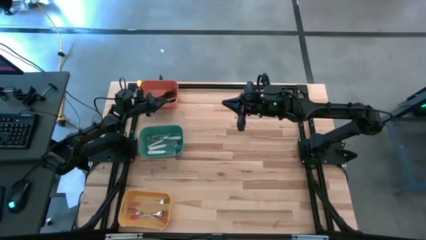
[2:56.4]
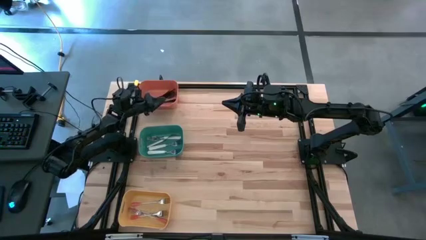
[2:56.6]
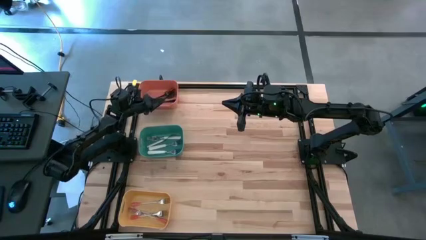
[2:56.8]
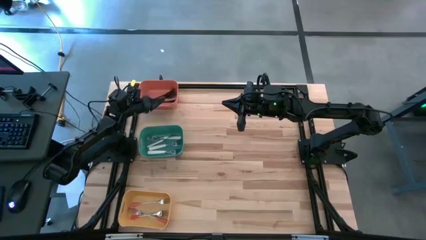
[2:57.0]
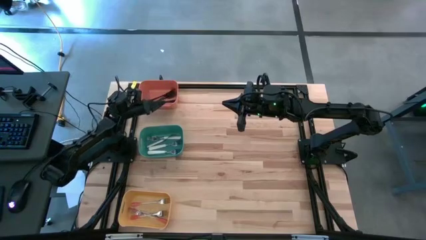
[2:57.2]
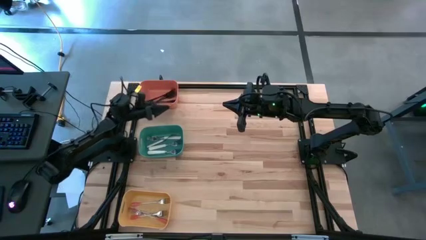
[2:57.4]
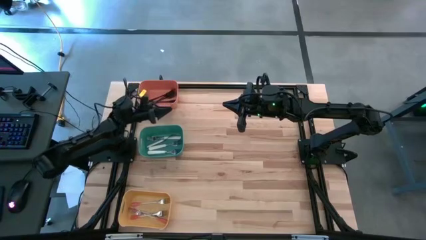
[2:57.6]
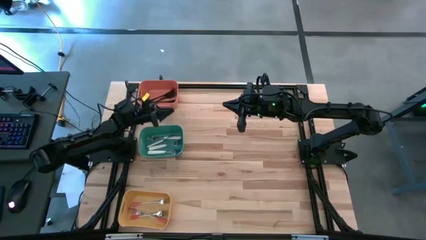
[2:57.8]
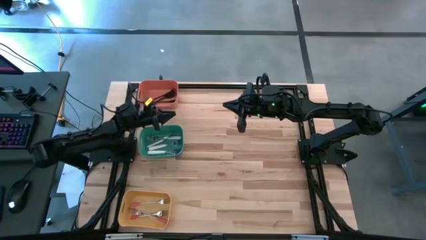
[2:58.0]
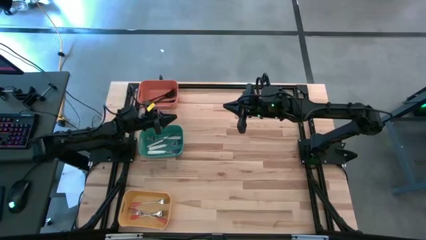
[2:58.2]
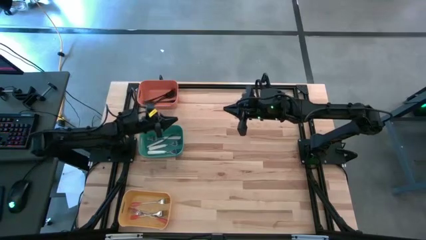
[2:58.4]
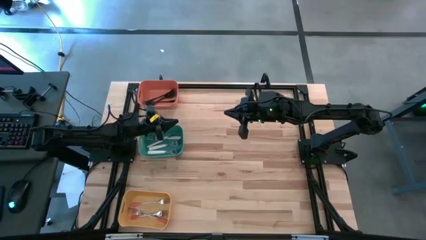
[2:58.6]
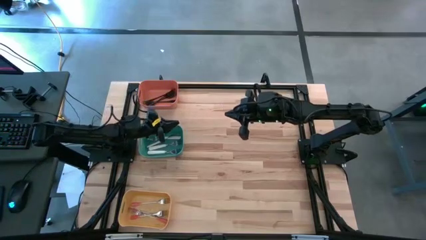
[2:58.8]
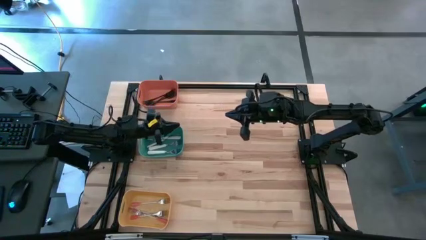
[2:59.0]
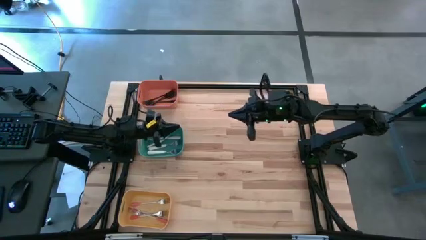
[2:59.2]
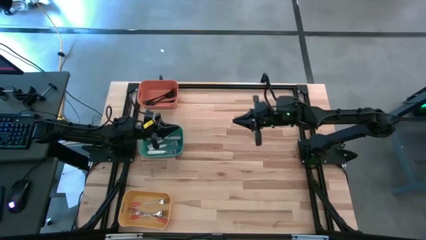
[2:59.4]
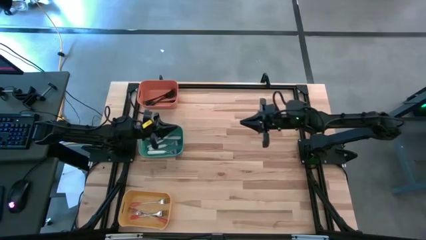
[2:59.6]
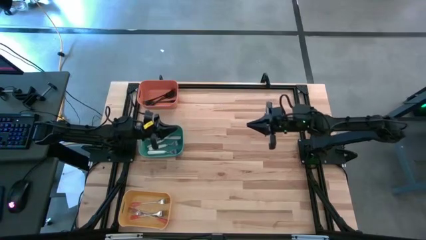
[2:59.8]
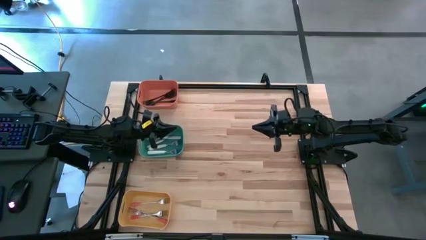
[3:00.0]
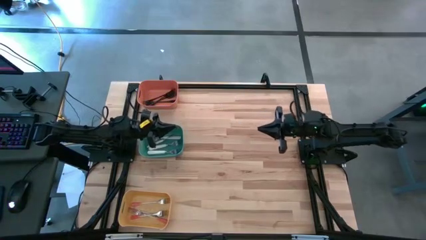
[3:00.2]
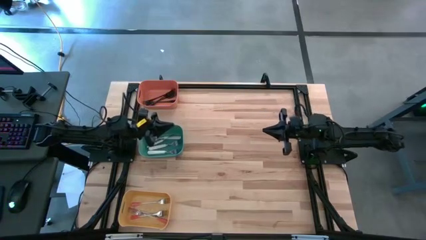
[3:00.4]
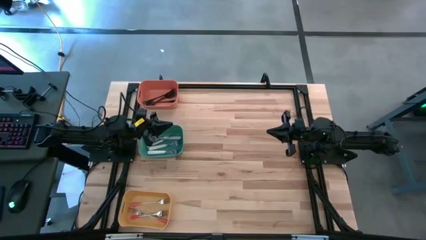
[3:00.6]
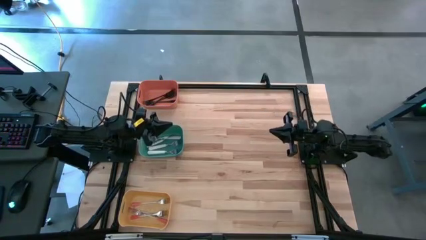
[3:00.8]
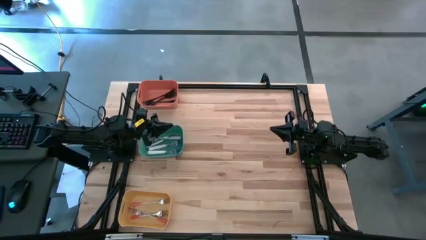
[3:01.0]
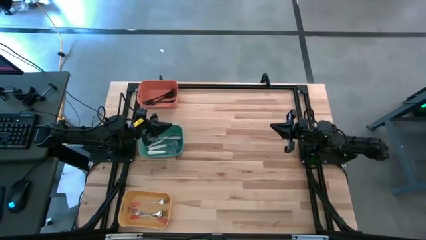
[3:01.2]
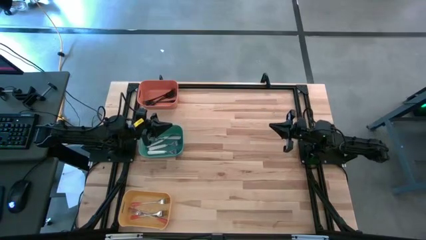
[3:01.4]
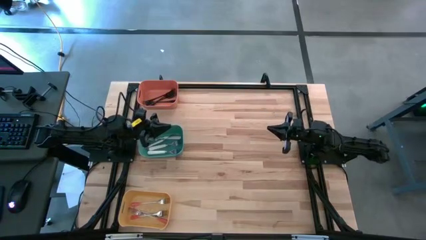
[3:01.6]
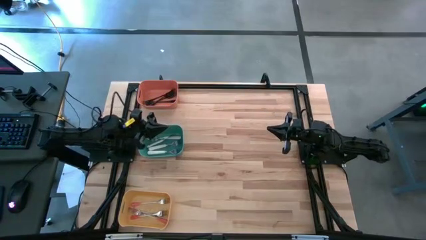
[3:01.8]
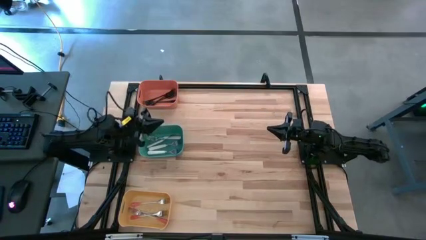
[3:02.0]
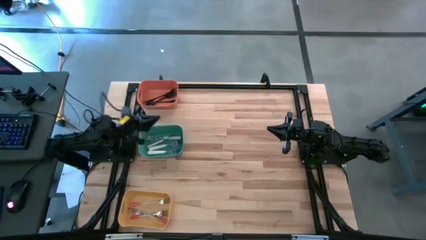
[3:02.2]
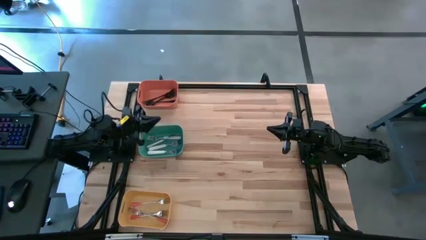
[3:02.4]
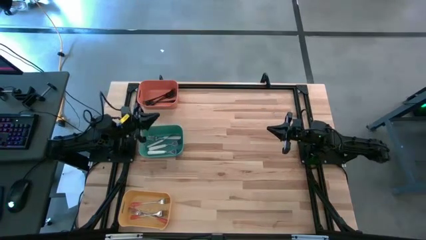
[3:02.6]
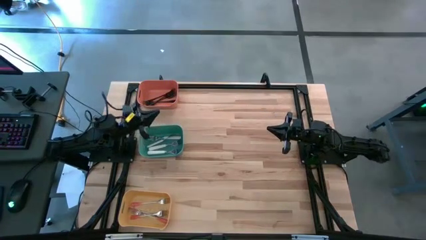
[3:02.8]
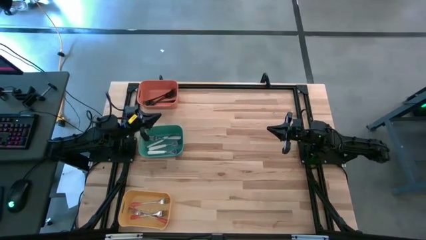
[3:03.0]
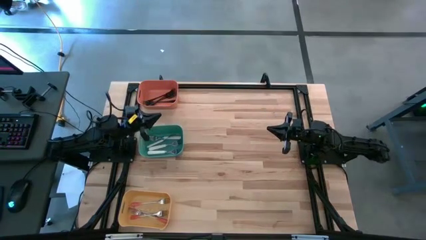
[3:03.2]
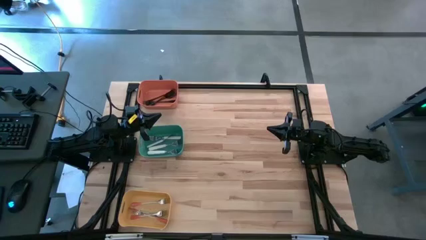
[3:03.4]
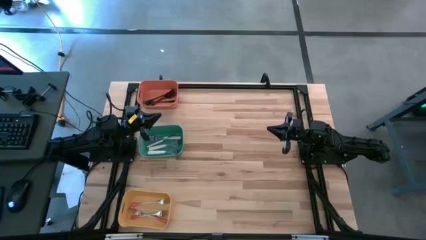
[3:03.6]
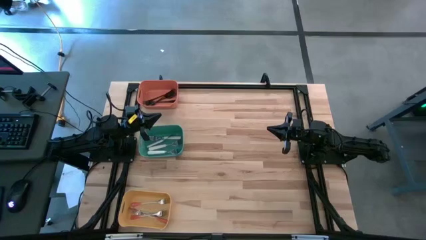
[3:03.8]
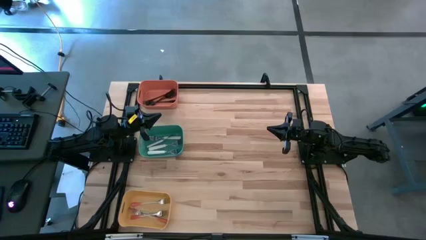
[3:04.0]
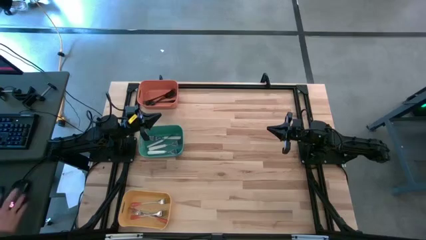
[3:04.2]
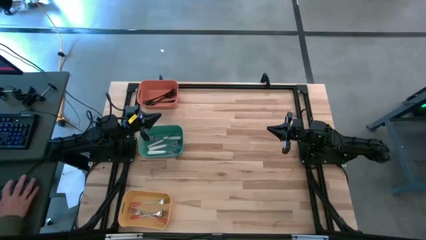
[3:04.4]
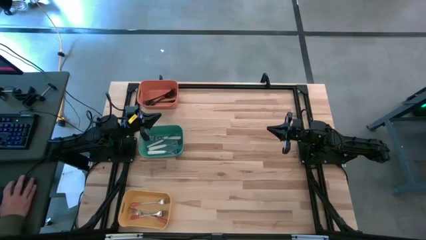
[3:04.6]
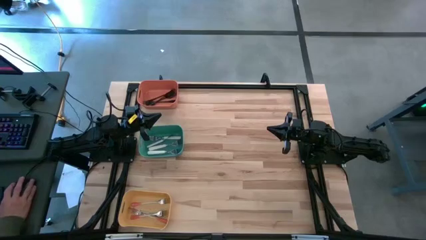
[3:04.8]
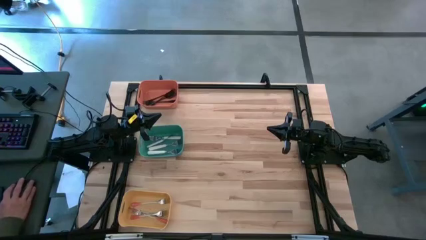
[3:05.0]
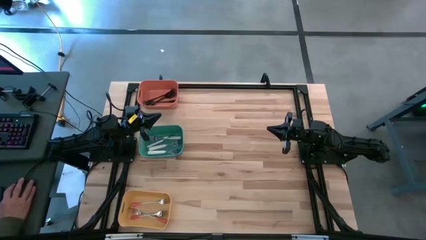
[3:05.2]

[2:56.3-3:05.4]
Task: Sort silverware by color (type)
Return to Home Position
